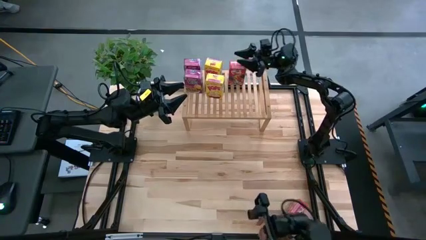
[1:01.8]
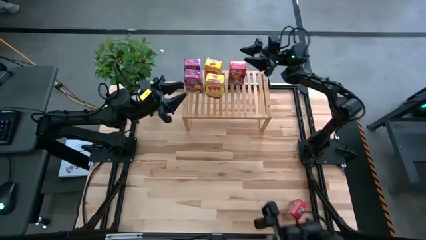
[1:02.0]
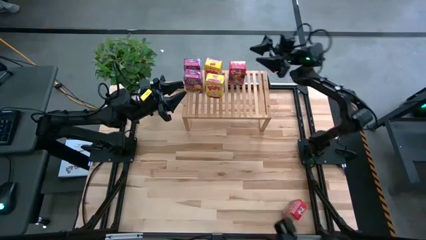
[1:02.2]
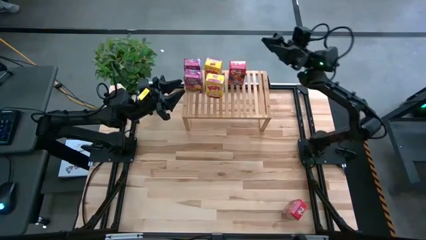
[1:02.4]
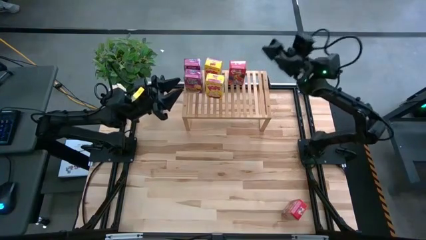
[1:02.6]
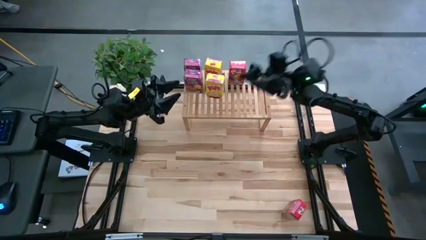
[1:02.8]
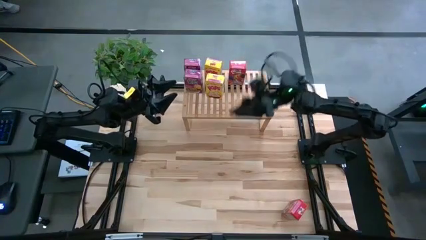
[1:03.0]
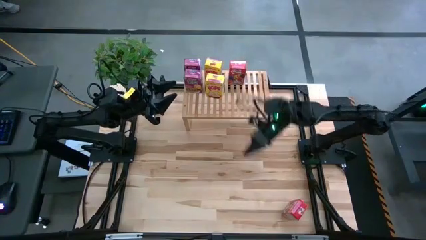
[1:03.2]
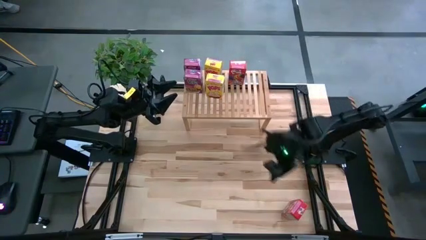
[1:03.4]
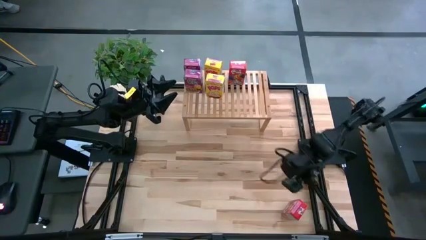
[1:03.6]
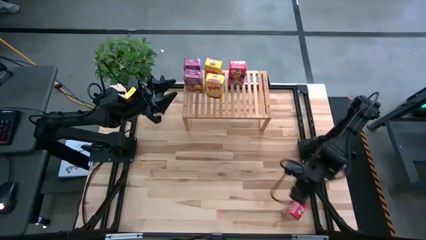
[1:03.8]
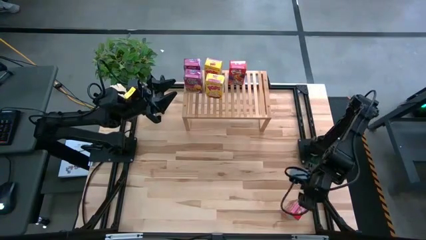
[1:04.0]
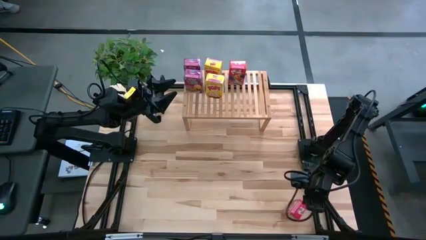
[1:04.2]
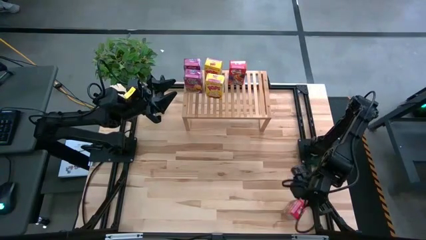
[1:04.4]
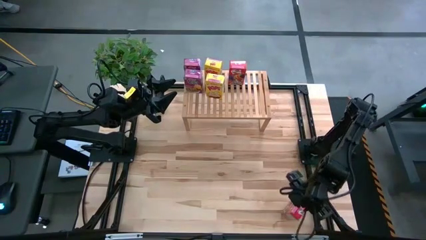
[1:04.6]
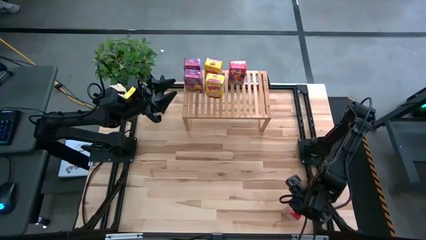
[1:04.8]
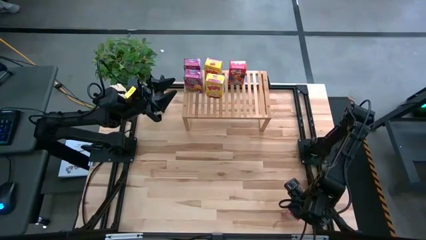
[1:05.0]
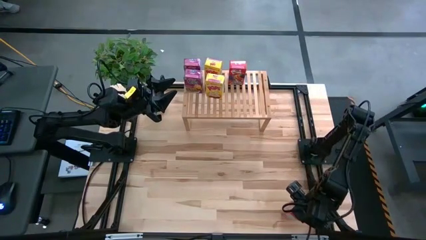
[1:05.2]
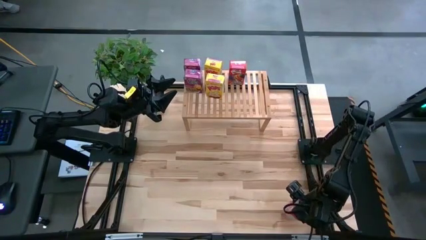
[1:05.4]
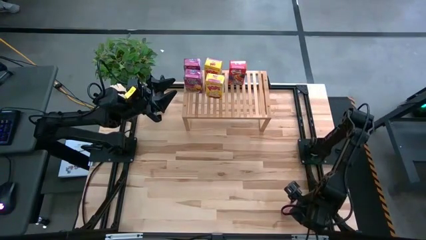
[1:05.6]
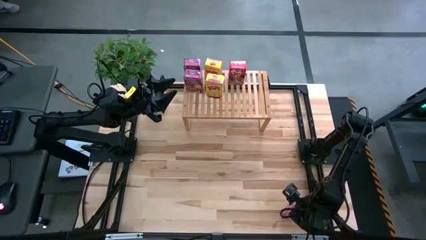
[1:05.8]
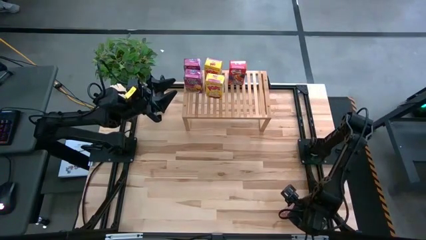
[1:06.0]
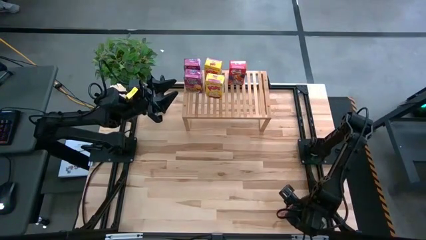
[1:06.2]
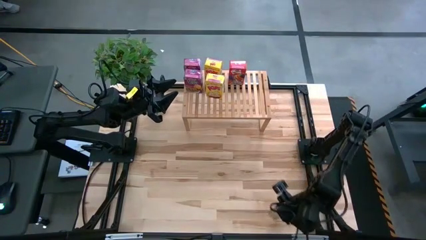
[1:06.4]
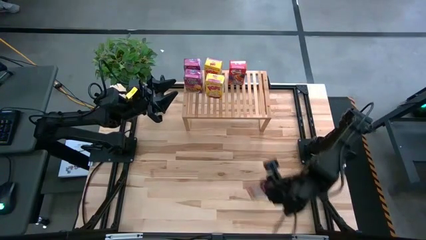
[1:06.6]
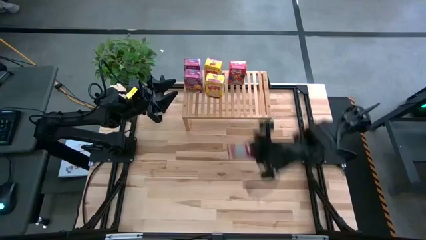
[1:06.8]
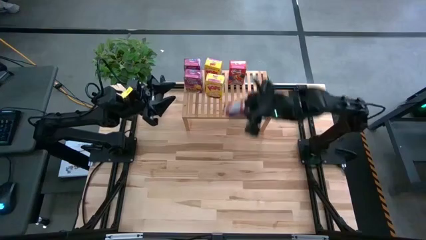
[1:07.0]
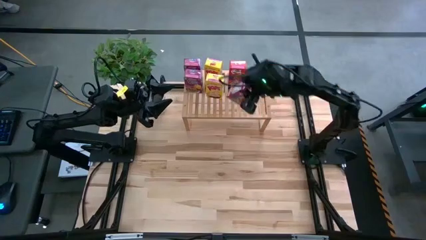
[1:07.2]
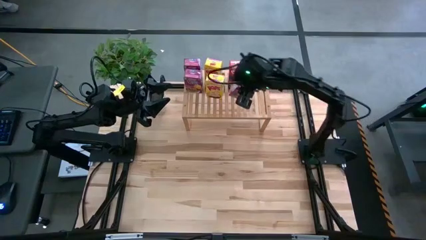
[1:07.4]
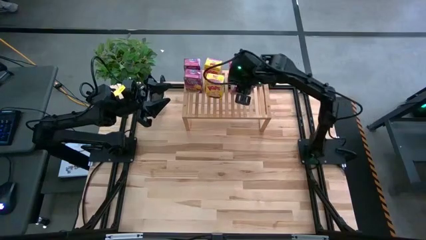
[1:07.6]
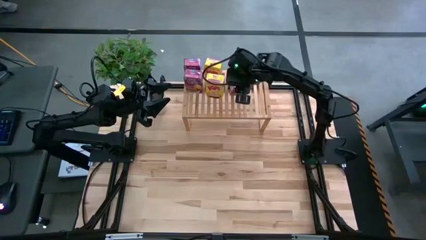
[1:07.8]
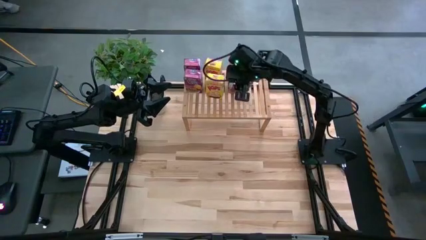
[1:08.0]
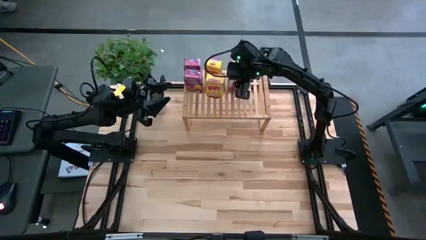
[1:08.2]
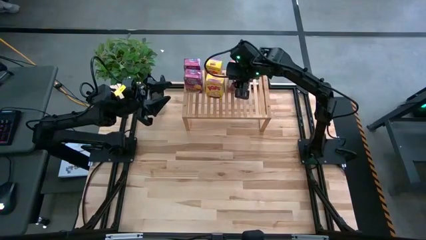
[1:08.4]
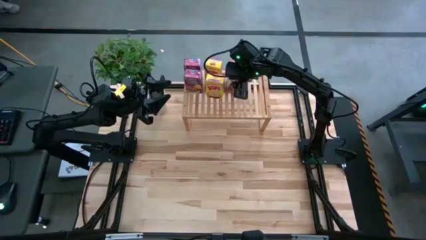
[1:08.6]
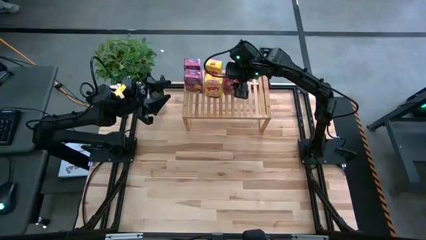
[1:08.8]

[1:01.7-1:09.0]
Task: Stack cereal on shelf
Put the red cereal box aligned with the other red cereal box on the shelf

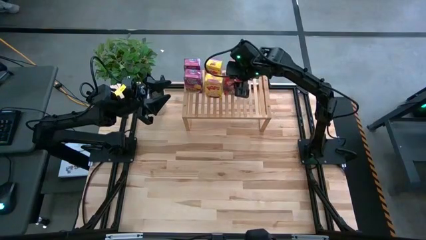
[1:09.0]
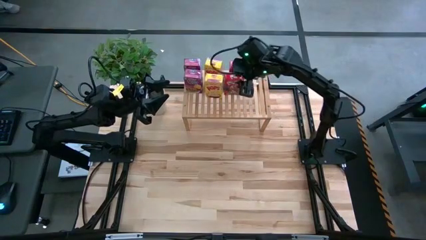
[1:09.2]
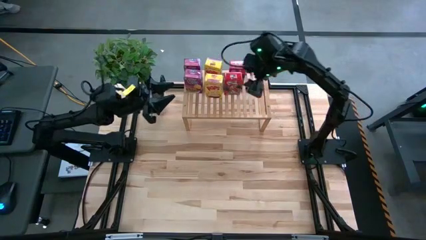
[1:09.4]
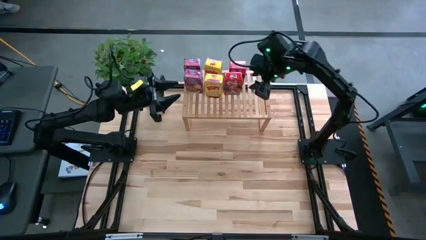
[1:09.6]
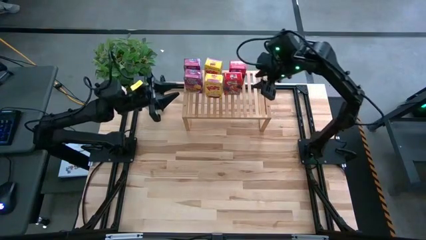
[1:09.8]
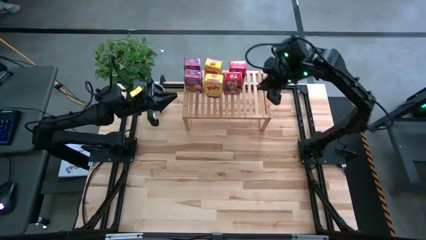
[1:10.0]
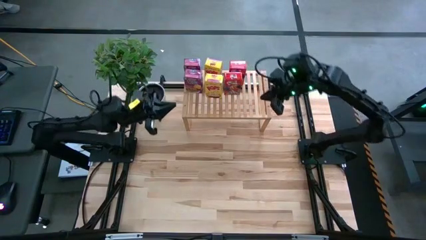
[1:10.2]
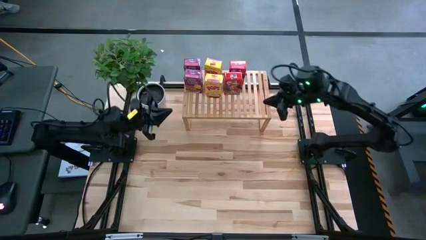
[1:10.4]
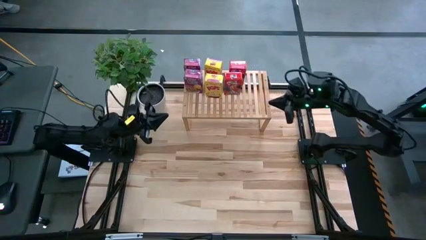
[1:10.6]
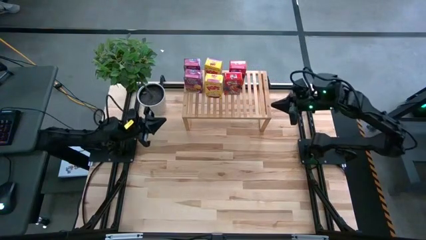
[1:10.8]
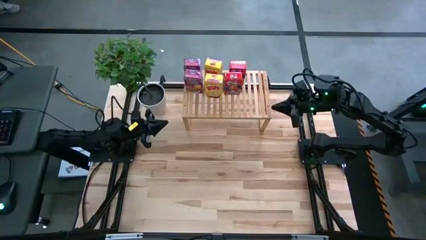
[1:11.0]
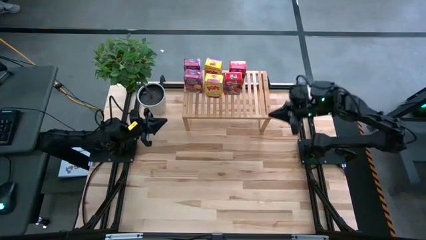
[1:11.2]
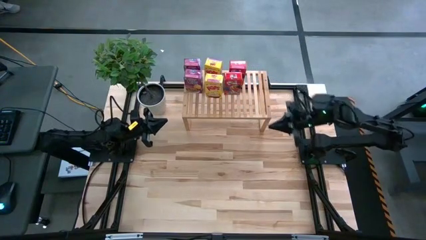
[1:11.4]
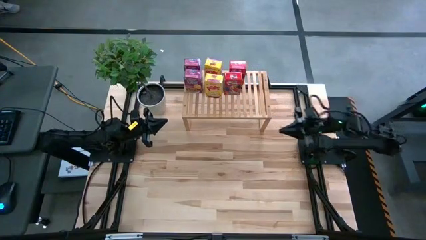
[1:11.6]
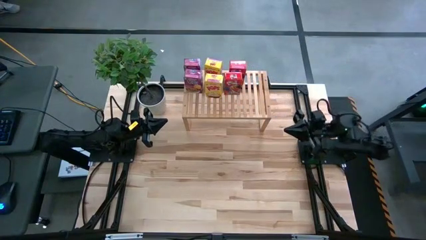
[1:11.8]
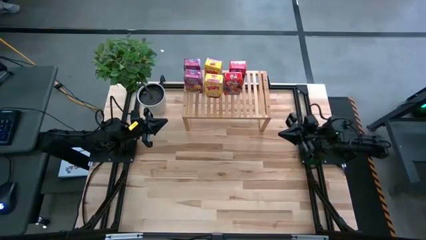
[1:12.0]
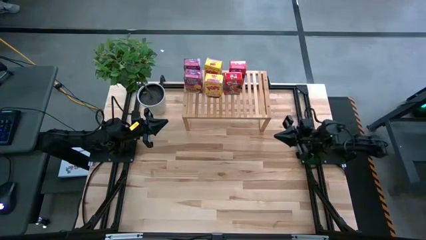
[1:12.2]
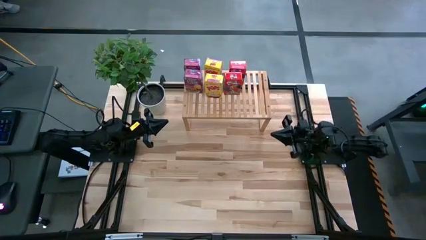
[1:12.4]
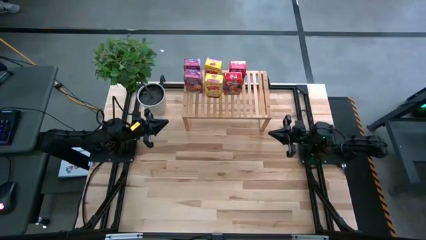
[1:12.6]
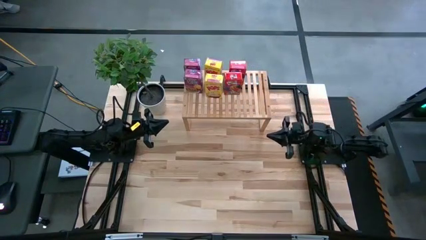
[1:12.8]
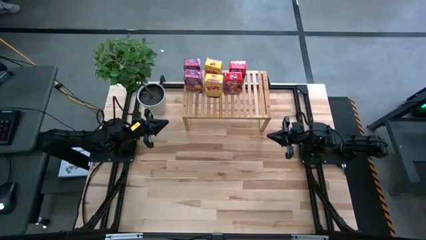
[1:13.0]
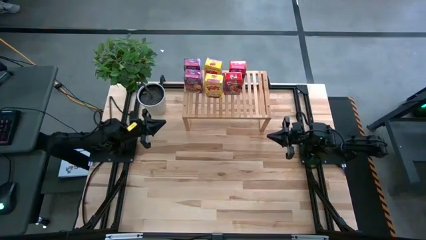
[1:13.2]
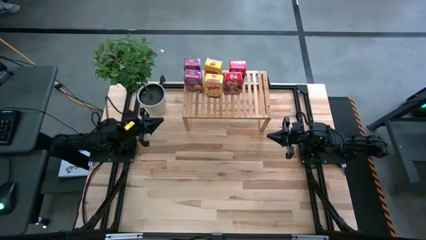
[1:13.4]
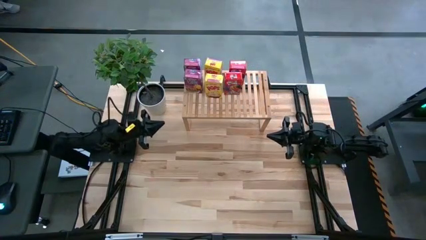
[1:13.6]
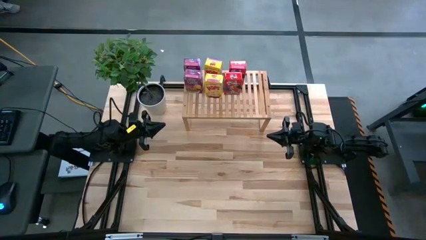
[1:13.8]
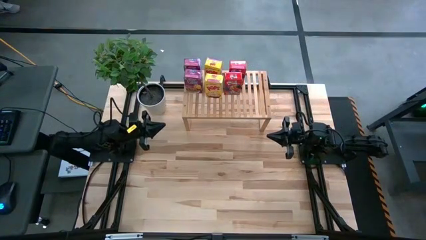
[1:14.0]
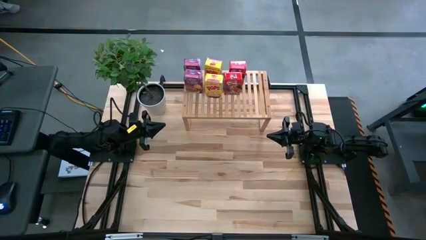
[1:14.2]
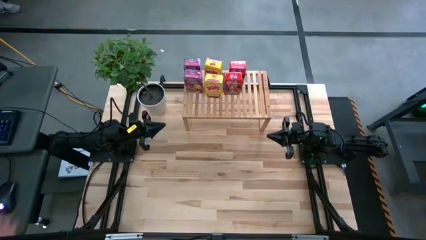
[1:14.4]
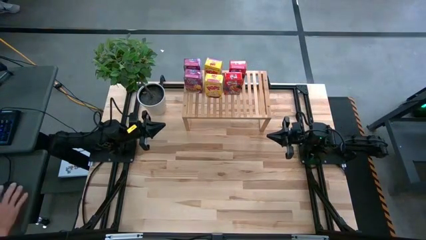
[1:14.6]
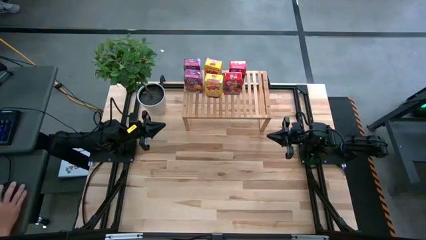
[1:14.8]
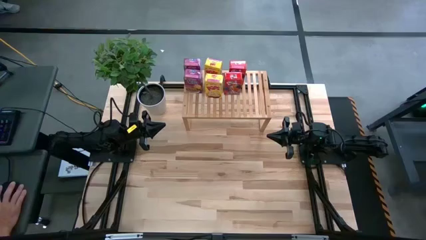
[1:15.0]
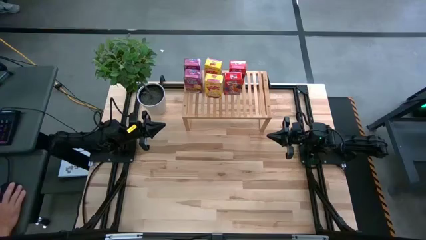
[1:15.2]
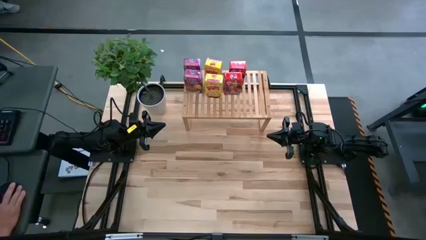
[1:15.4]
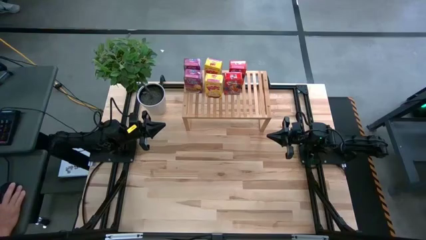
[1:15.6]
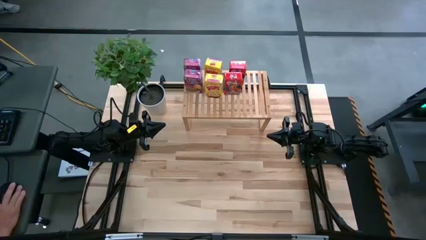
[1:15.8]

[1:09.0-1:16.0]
Return to Home Position

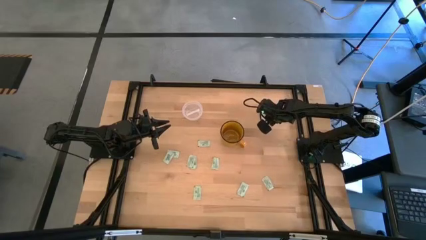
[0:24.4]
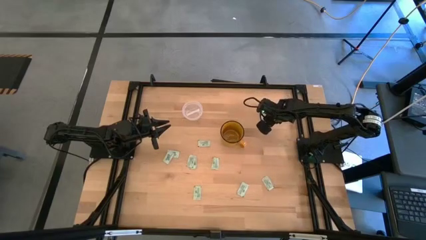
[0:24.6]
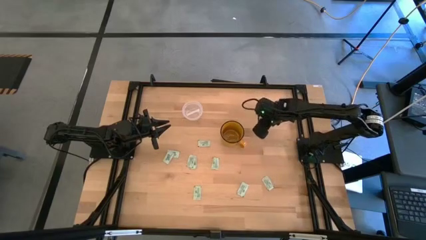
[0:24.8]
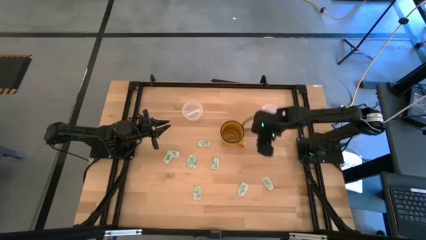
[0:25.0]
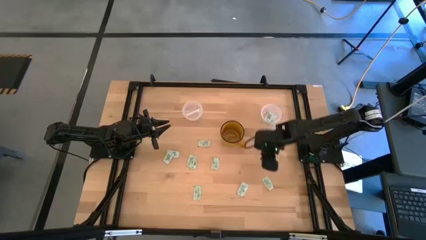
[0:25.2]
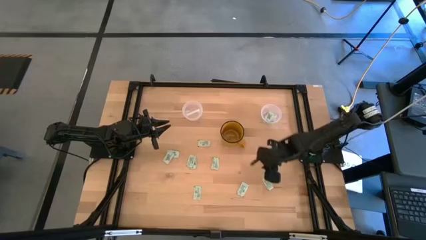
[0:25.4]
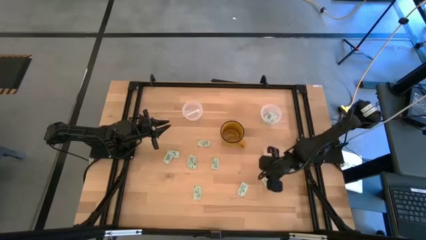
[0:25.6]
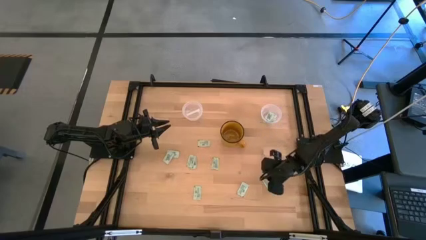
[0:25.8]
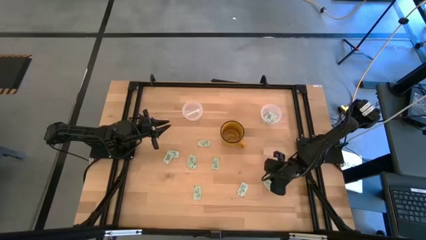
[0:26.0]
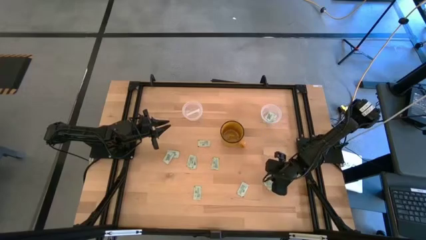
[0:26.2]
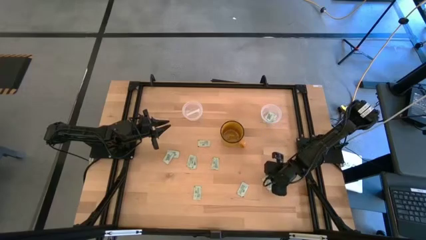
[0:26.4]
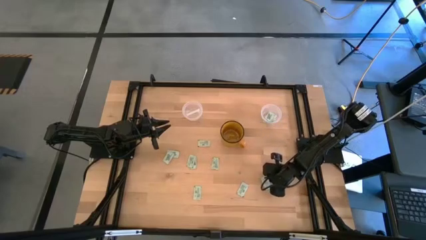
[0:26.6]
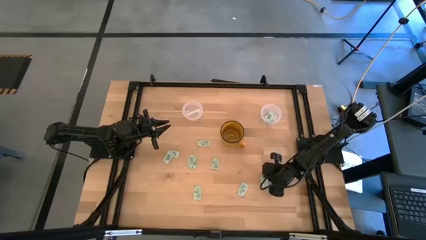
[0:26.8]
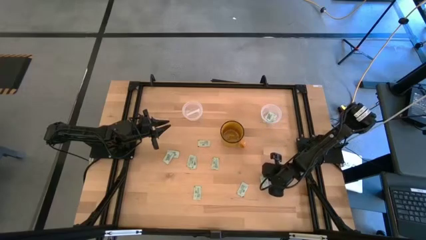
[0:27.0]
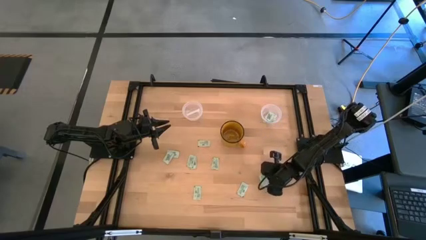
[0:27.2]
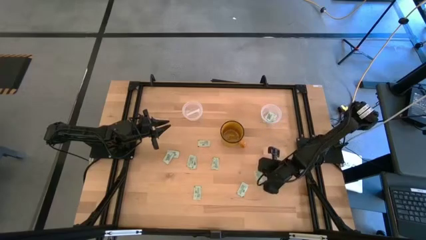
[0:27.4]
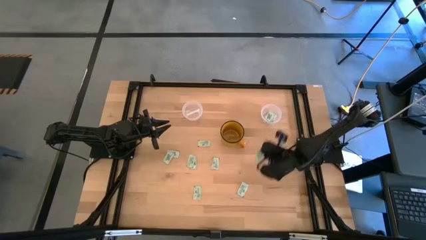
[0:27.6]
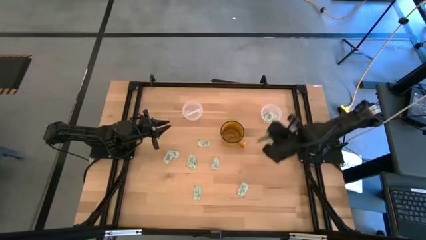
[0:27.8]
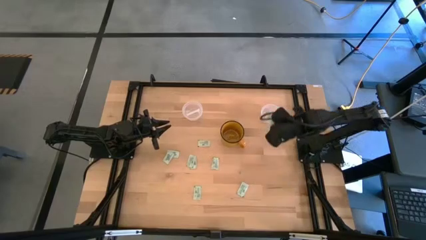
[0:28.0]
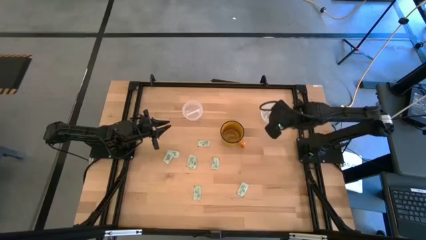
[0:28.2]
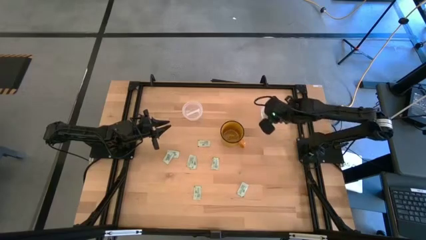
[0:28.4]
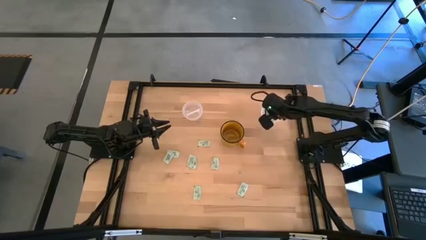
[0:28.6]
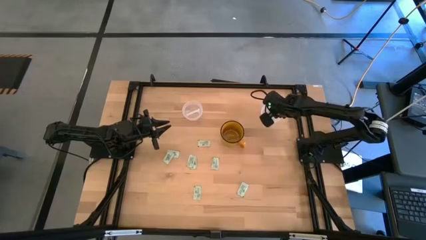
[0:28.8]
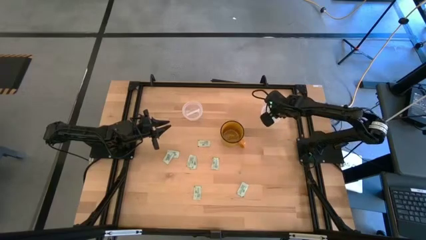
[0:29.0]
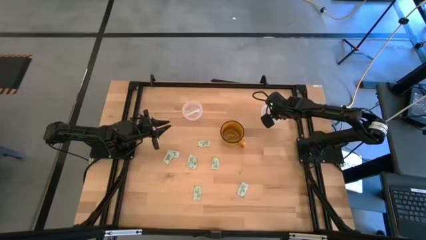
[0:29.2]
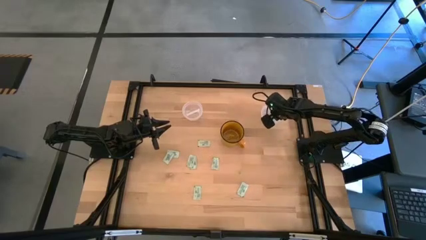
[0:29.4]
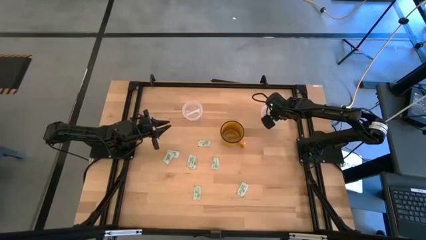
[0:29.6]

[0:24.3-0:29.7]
Task: Pick and place Stevia / Truvia into bins
Put the white stevia packet into the right transparent container
